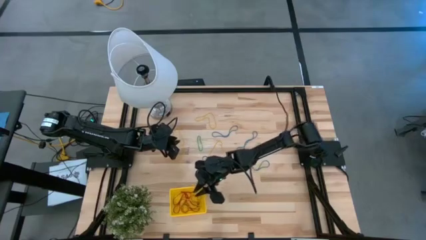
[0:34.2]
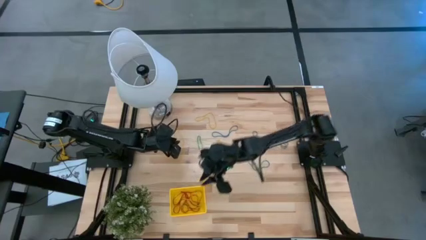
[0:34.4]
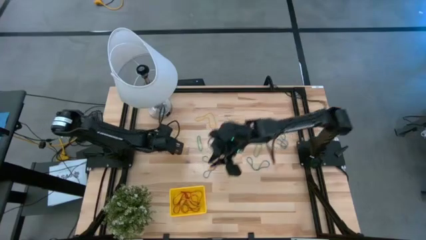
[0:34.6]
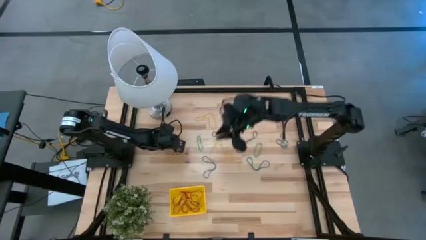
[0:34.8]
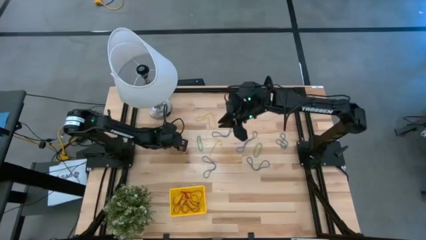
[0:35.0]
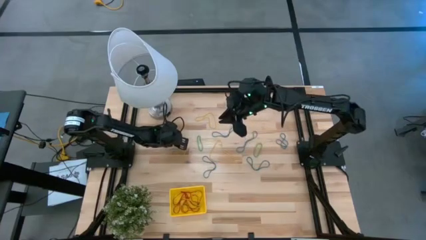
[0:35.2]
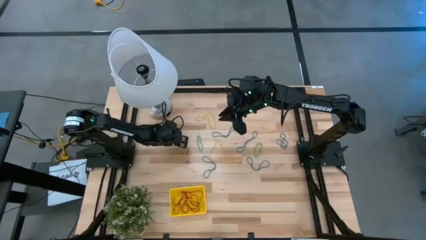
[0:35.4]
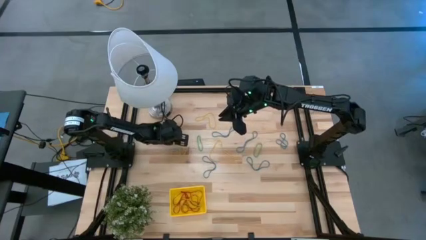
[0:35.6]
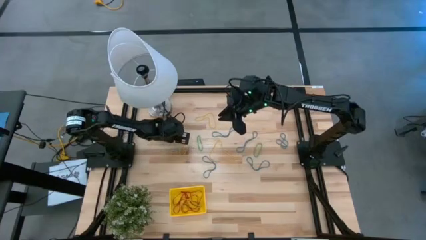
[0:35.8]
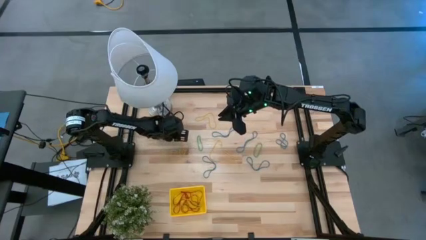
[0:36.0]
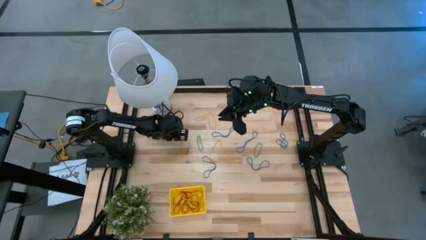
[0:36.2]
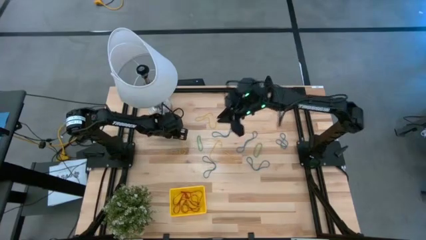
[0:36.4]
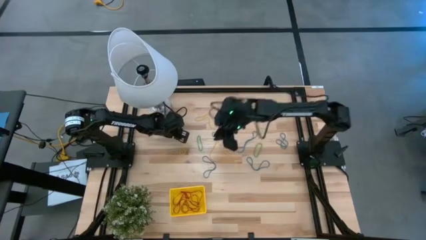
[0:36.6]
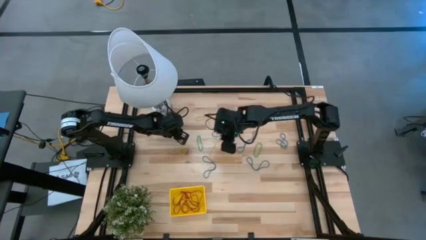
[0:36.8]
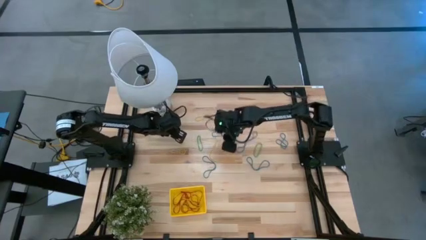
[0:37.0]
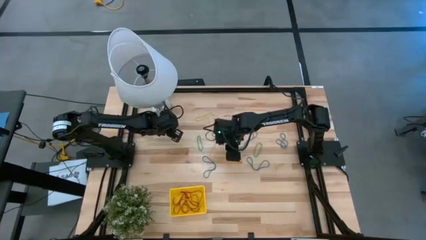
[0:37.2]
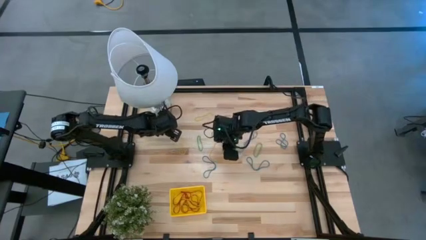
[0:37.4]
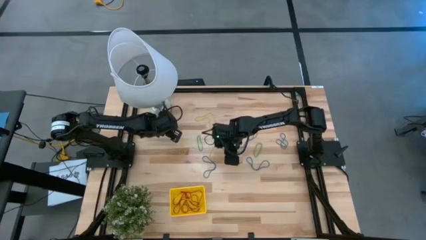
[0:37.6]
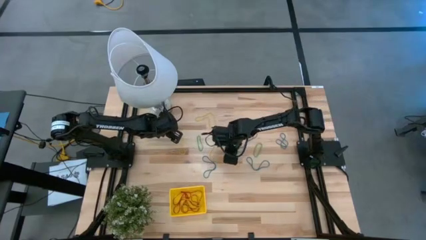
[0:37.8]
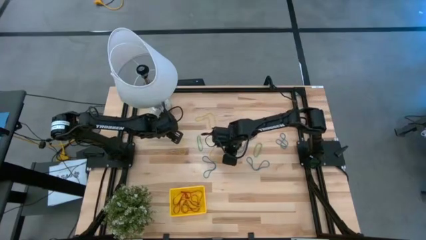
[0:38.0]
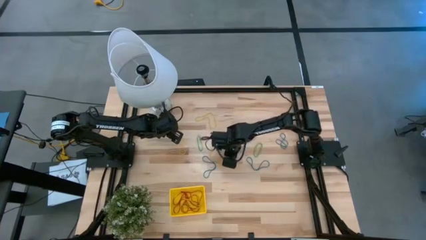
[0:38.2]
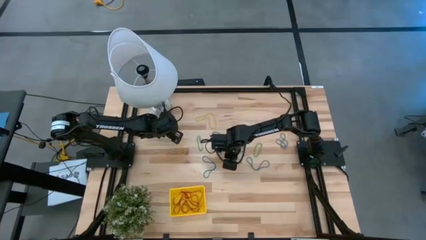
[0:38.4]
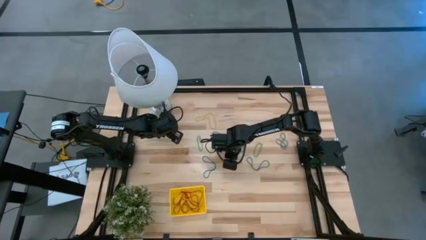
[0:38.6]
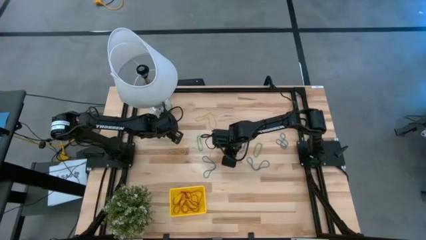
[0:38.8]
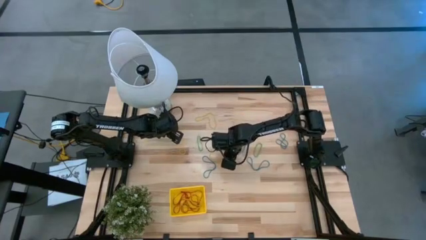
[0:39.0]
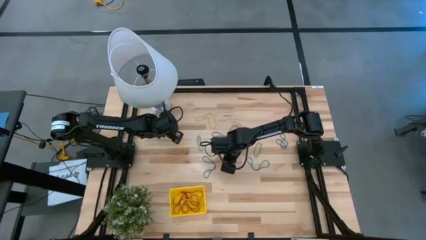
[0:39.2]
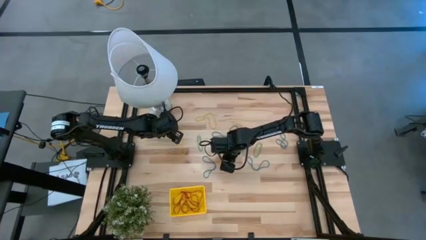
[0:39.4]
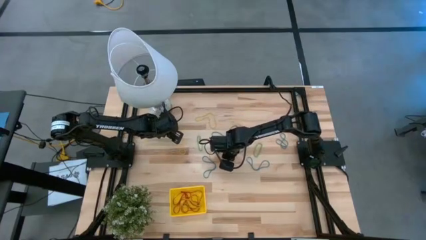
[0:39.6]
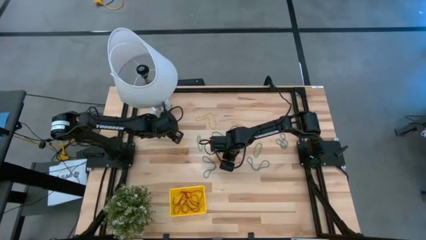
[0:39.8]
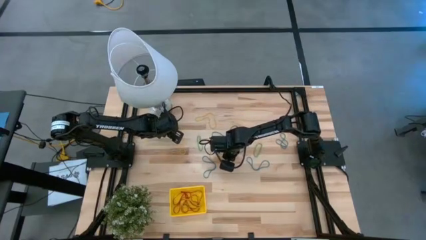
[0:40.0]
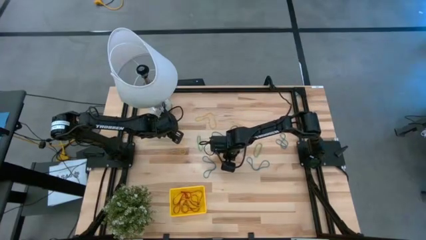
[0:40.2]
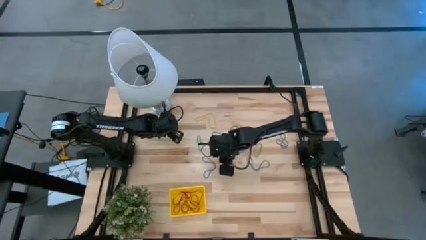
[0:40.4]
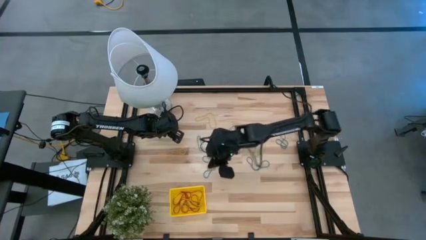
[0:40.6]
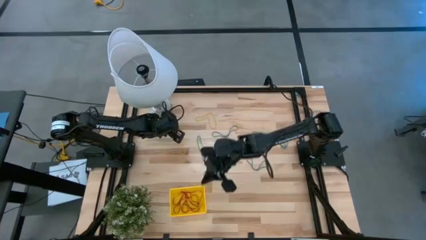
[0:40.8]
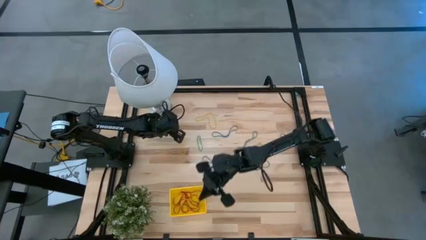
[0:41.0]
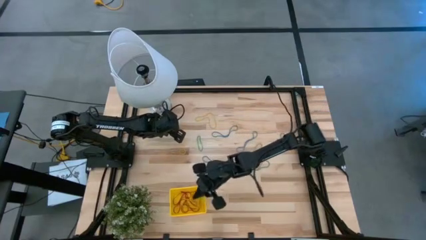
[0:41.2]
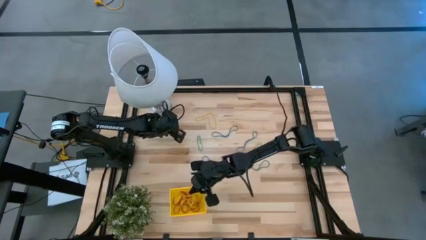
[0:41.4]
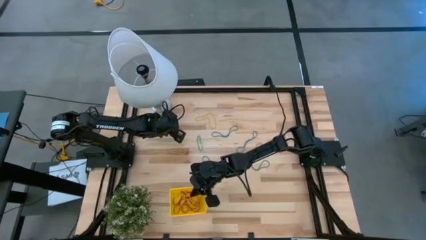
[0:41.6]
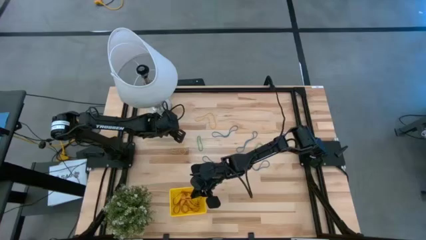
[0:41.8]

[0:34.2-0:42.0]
Task: Pick and place items into bin
Put the yellow rubber band into the yellow bin

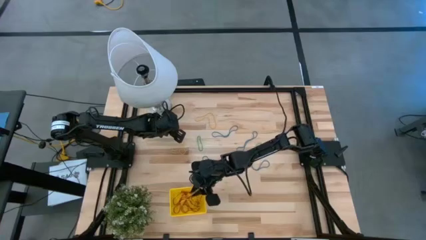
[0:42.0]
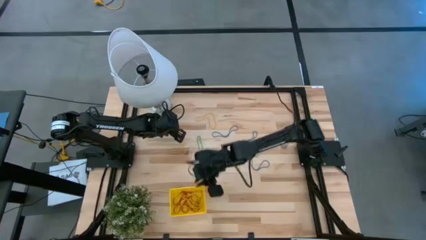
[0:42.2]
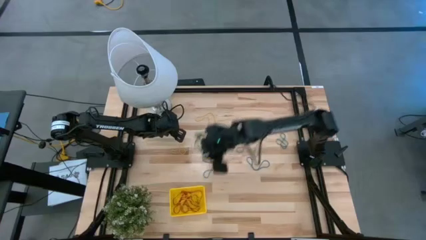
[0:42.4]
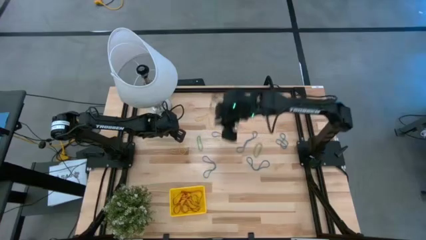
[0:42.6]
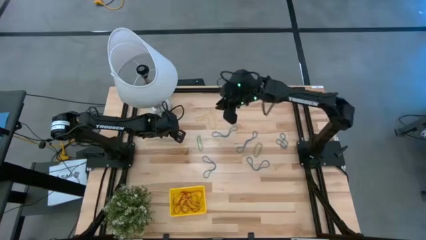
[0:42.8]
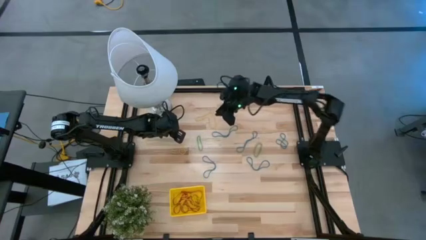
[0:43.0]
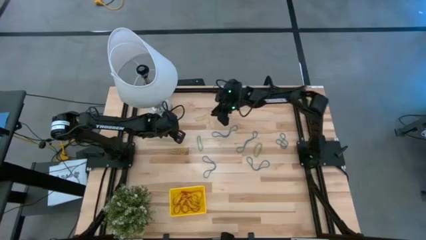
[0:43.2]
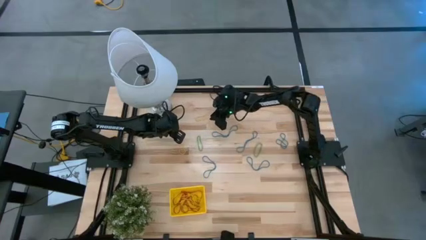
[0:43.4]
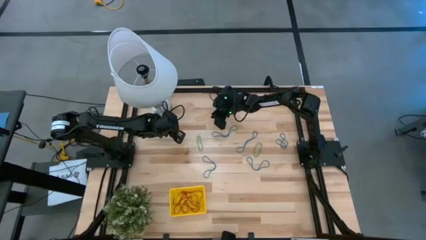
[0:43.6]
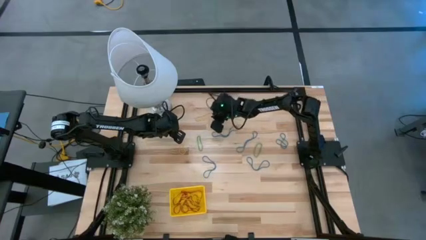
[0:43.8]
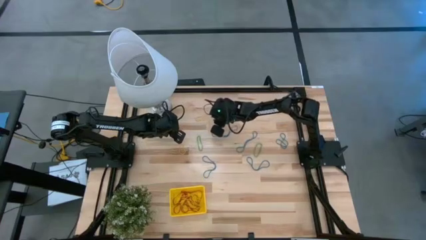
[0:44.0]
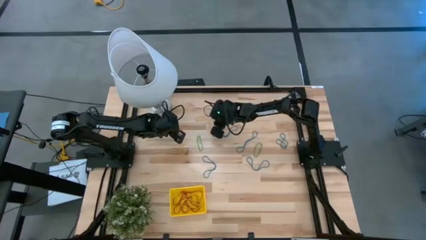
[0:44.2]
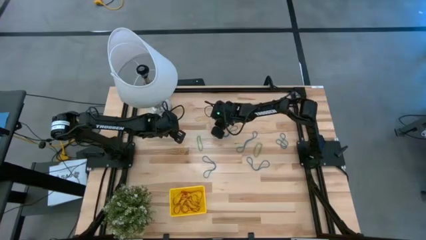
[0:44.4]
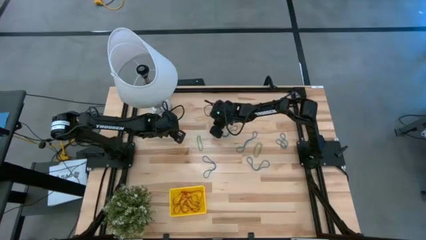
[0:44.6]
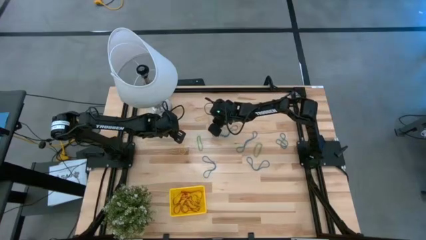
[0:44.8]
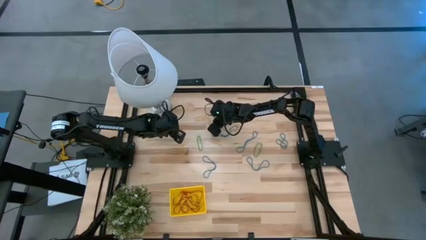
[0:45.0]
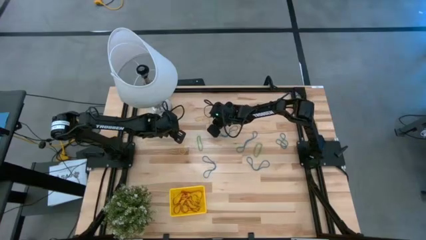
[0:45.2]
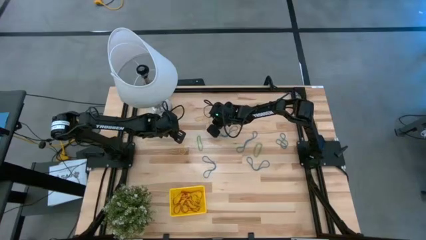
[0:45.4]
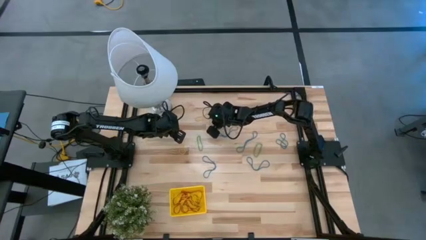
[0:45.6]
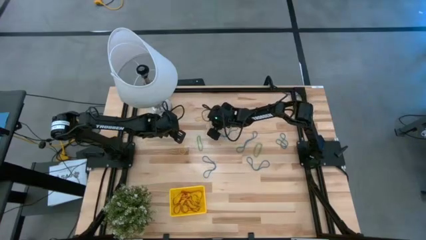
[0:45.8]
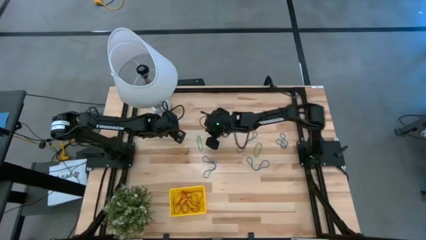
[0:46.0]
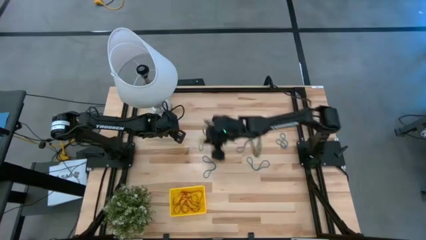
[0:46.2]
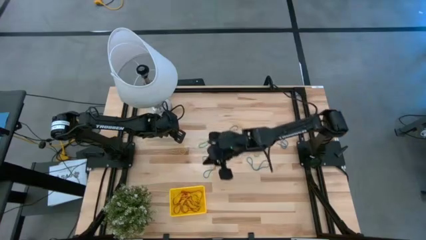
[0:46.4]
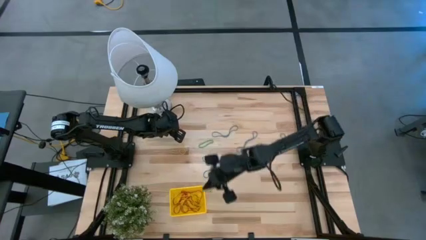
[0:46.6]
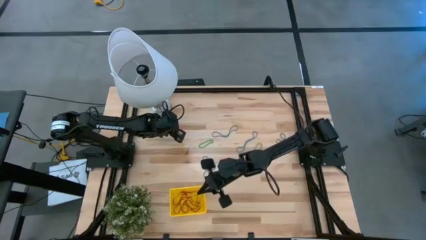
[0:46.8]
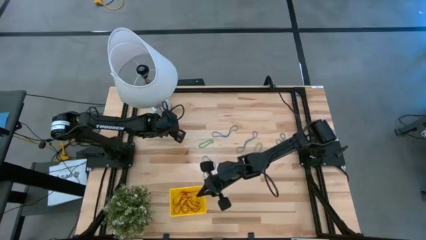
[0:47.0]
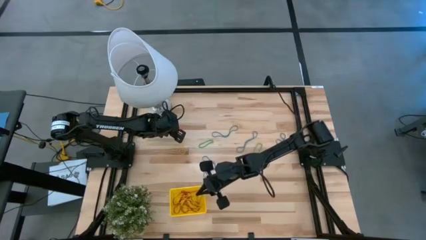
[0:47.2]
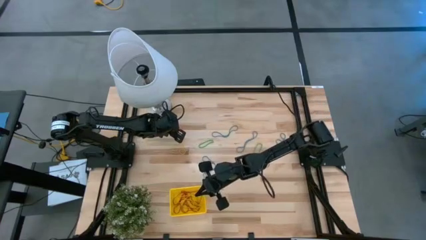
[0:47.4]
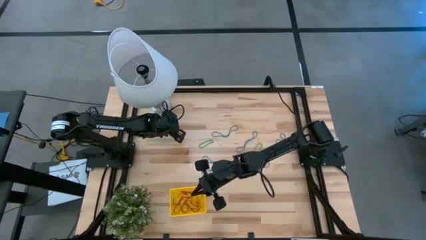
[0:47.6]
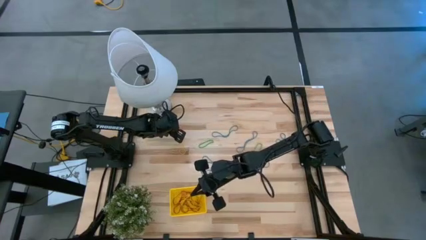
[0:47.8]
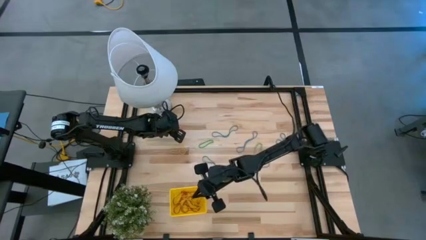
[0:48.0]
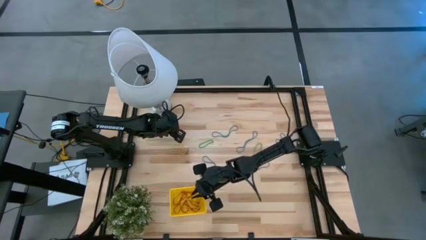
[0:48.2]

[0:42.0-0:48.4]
Put the yellow rubber band into the yellow bin

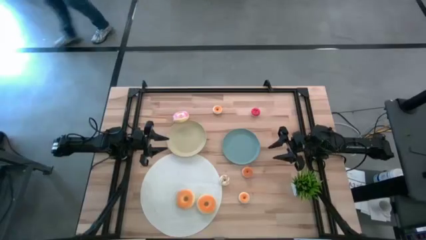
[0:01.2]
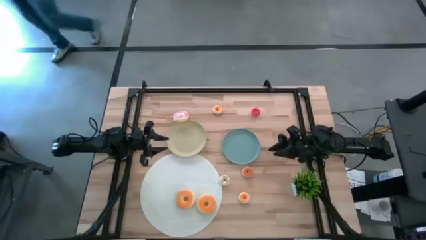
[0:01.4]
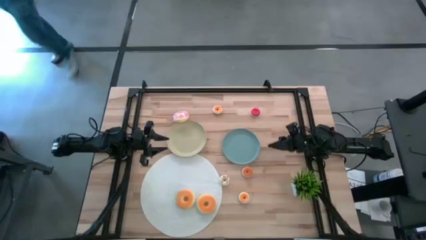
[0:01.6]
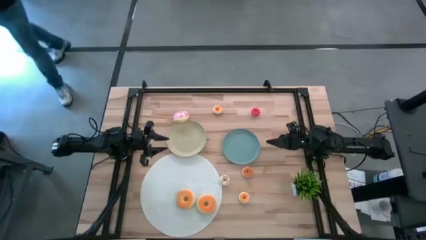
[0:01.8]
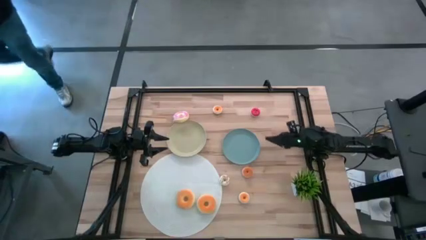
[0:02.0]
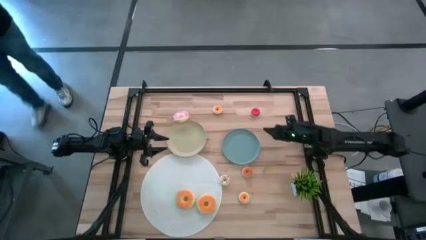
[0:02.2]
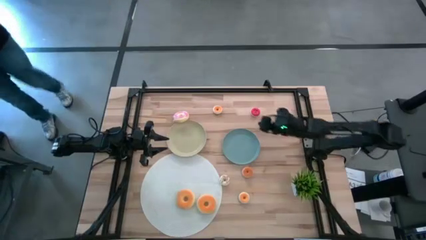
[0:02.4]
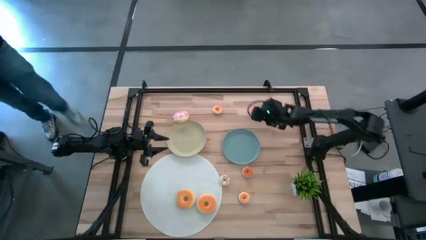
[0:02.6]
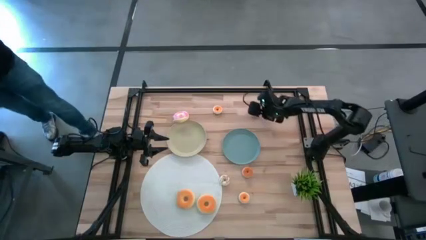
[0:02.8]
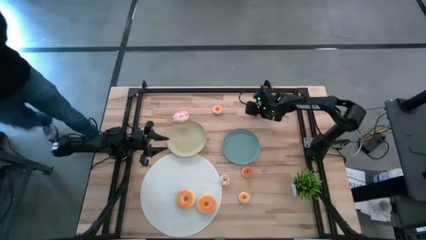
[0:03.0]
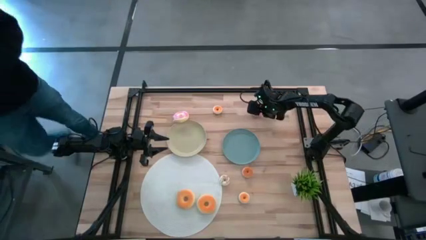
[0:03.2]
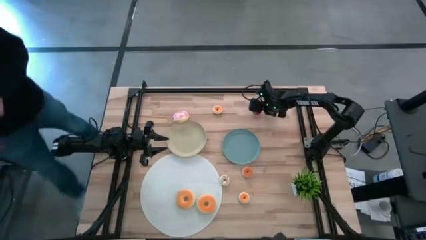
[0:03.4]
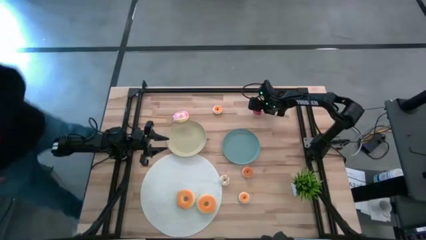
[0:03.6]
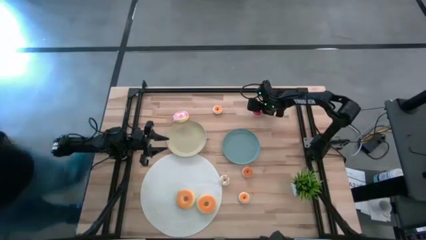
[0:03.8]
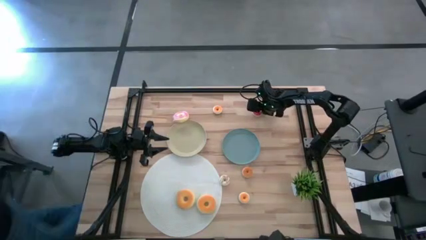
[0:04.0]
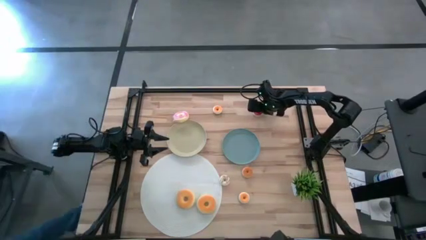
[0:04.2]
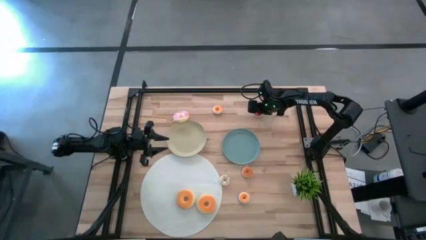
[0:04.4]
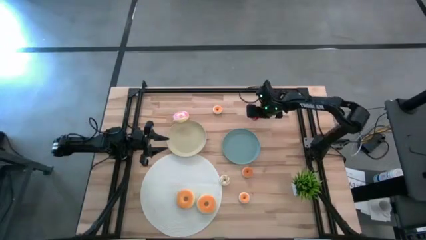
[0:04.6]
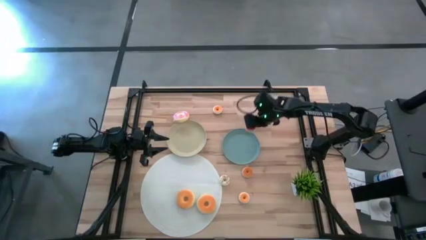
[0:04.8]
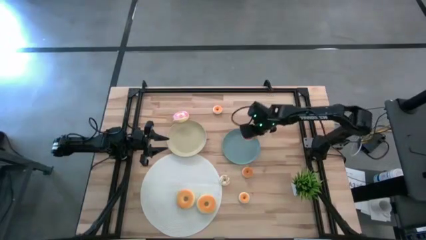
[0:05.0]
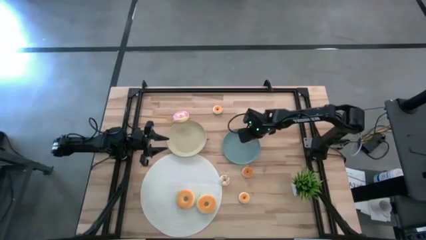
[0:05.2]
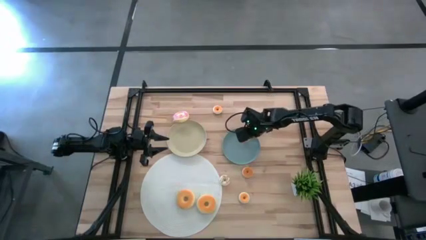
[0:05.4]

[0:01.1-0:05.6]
Task: Pick & Place donuts
Put the small red donut on the blue plate
